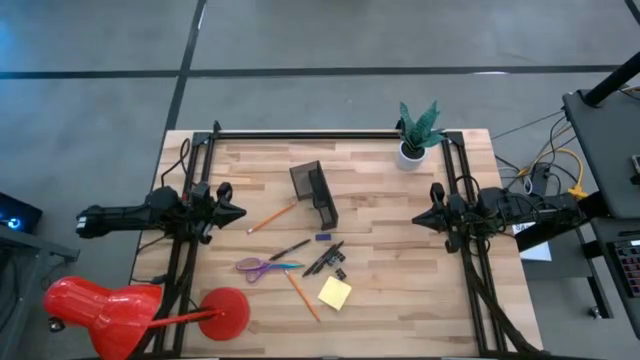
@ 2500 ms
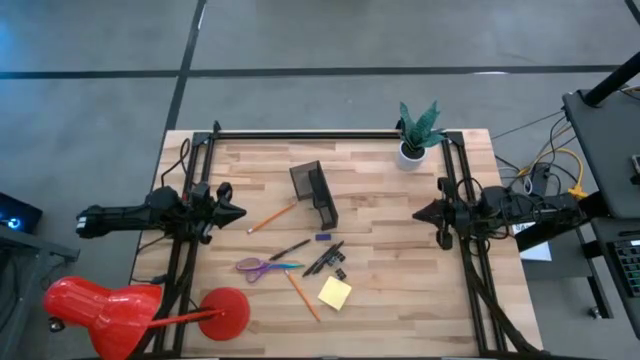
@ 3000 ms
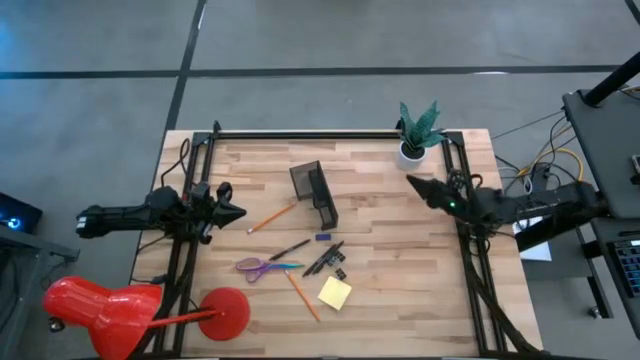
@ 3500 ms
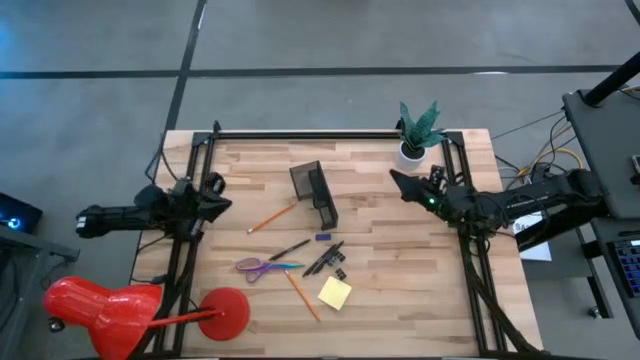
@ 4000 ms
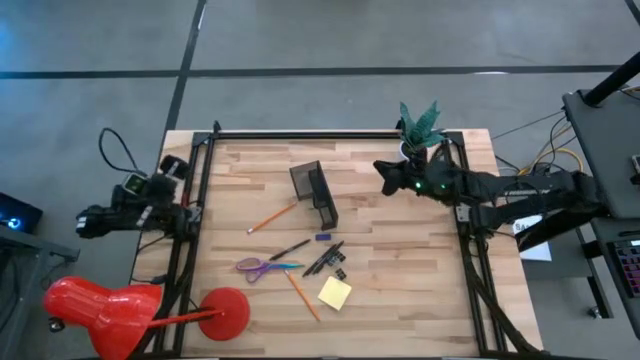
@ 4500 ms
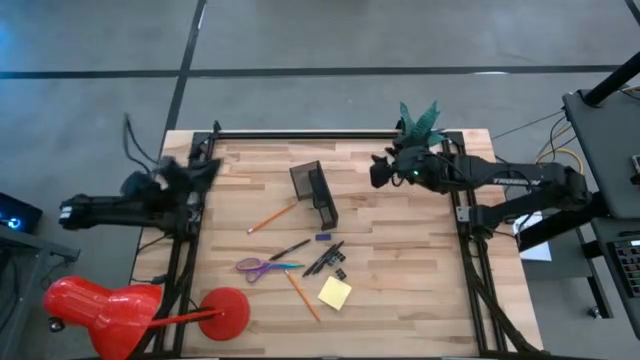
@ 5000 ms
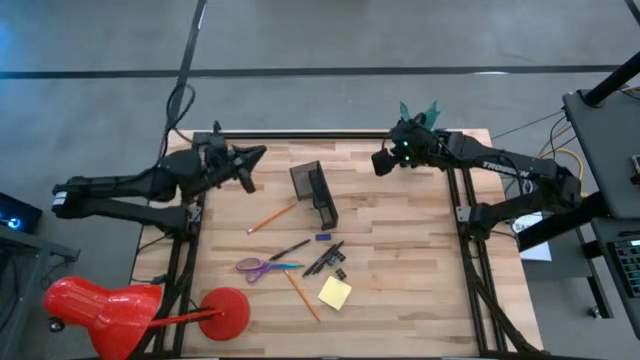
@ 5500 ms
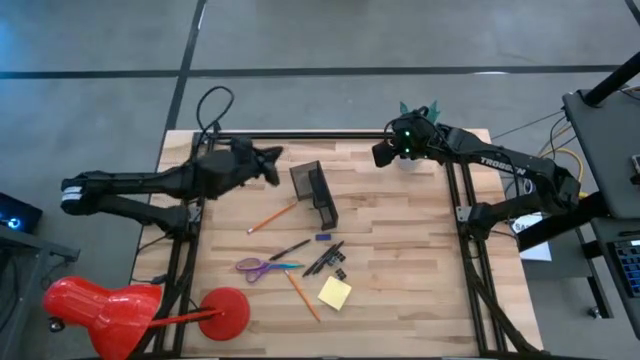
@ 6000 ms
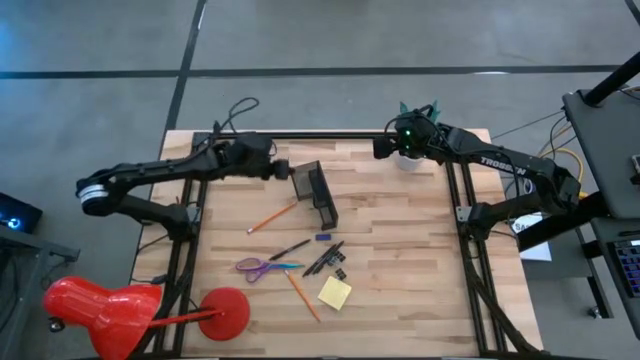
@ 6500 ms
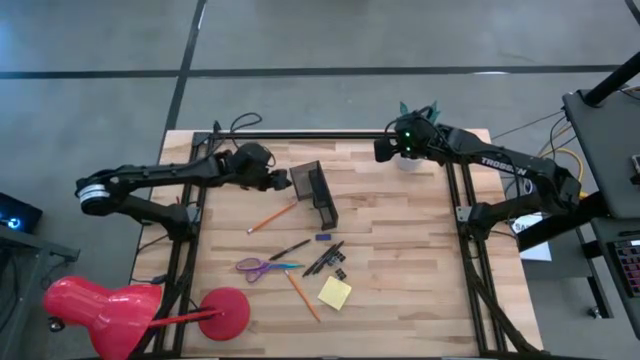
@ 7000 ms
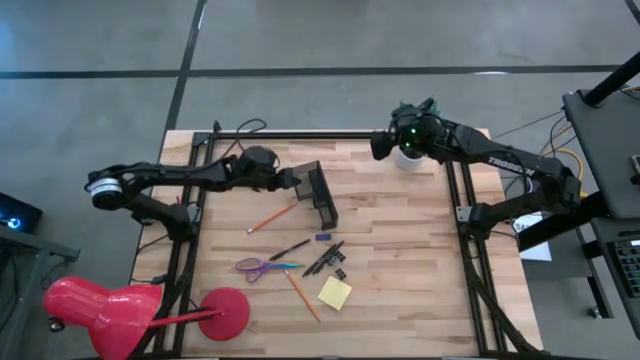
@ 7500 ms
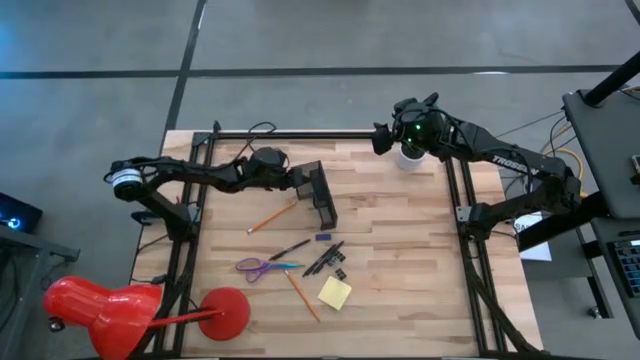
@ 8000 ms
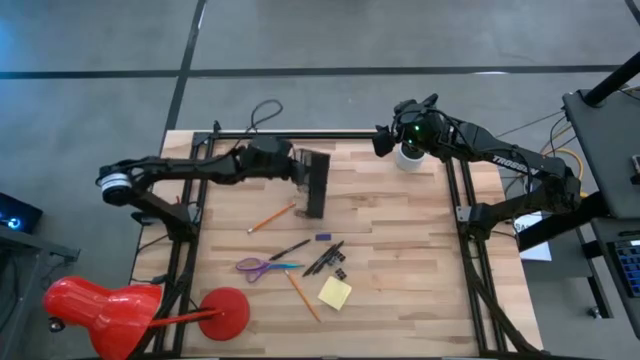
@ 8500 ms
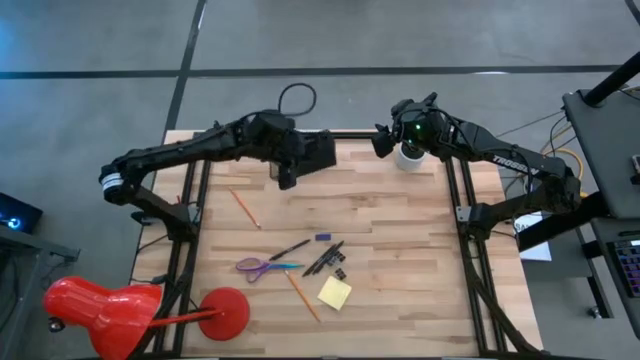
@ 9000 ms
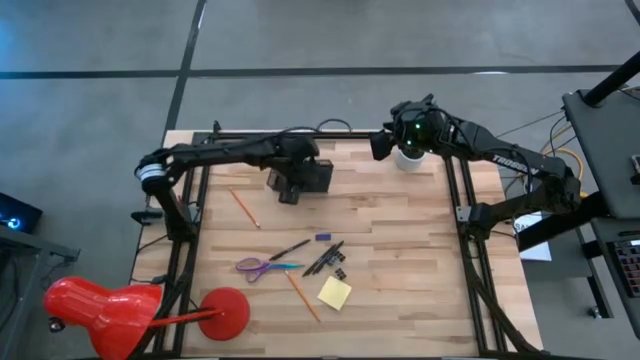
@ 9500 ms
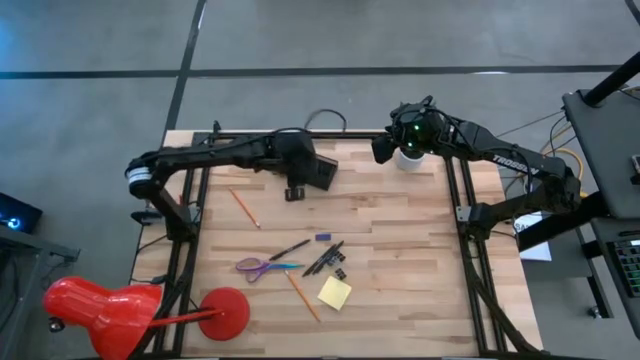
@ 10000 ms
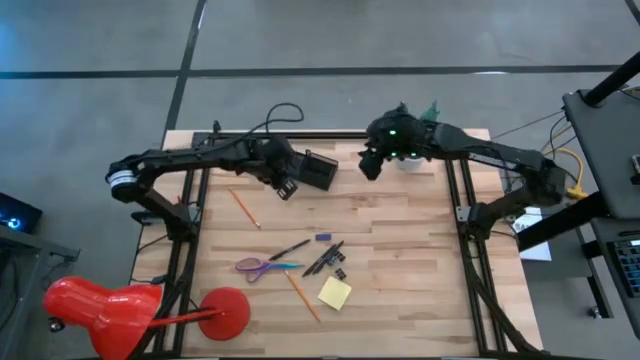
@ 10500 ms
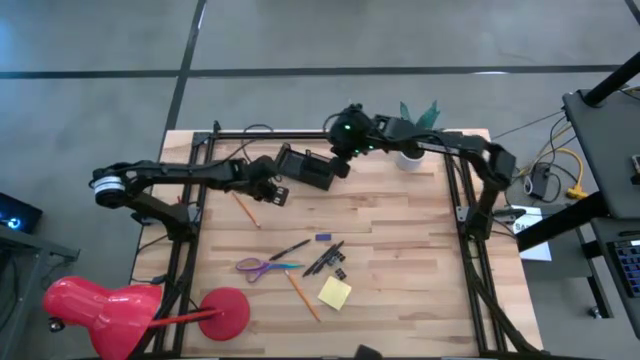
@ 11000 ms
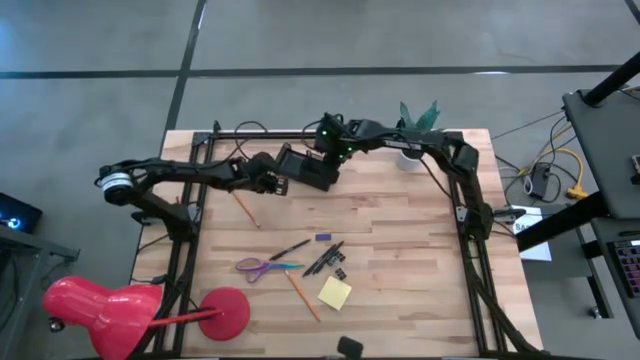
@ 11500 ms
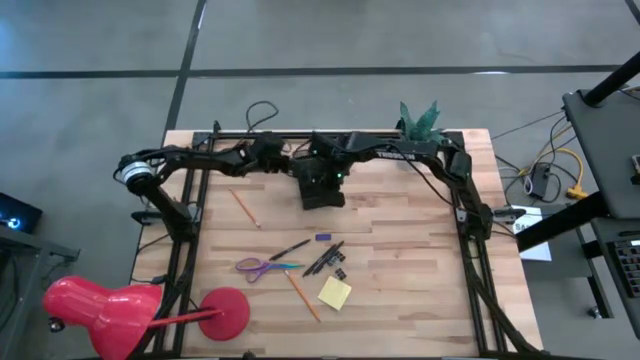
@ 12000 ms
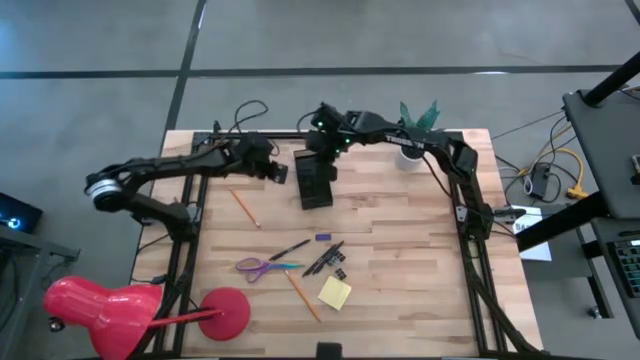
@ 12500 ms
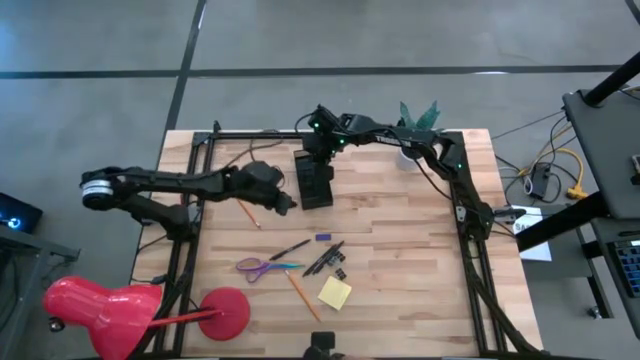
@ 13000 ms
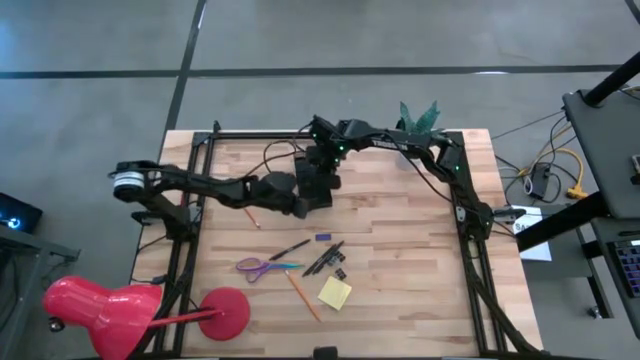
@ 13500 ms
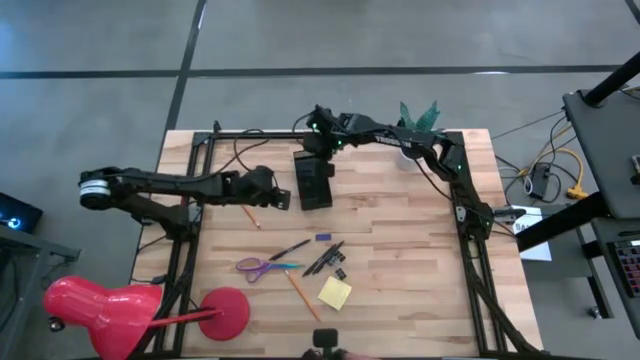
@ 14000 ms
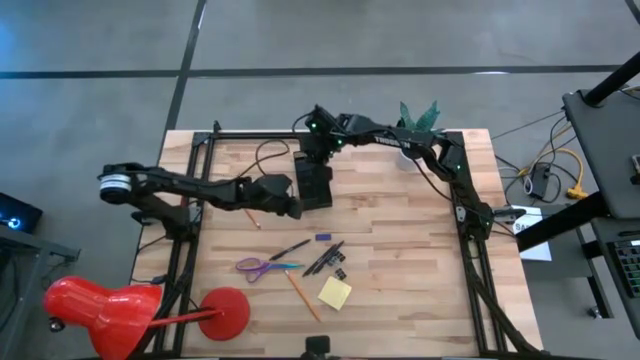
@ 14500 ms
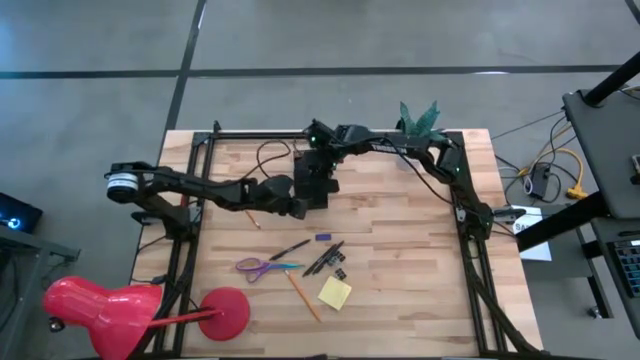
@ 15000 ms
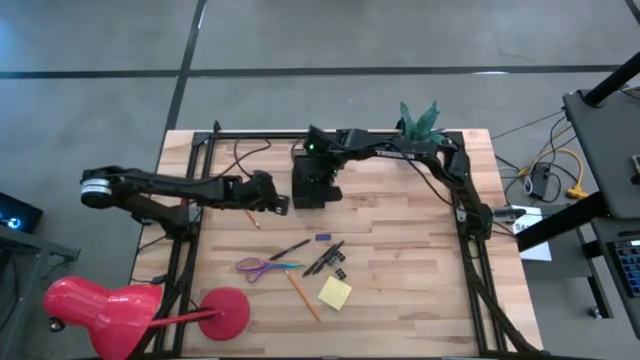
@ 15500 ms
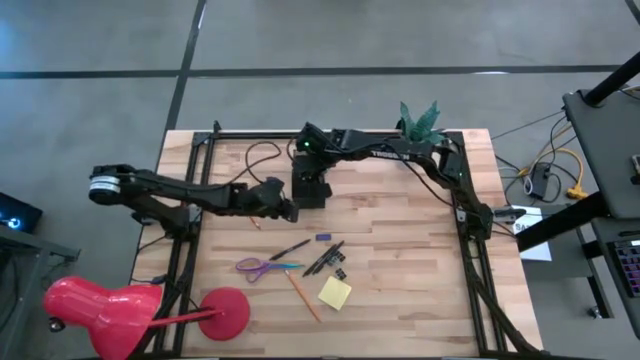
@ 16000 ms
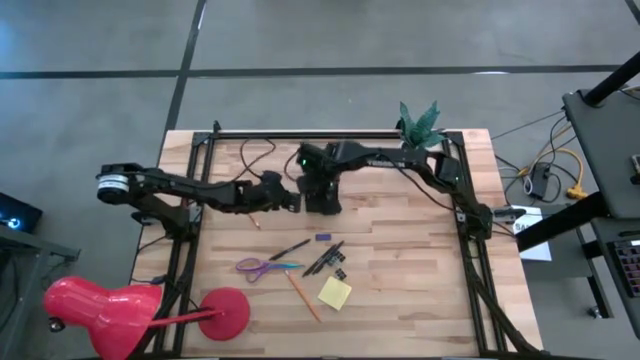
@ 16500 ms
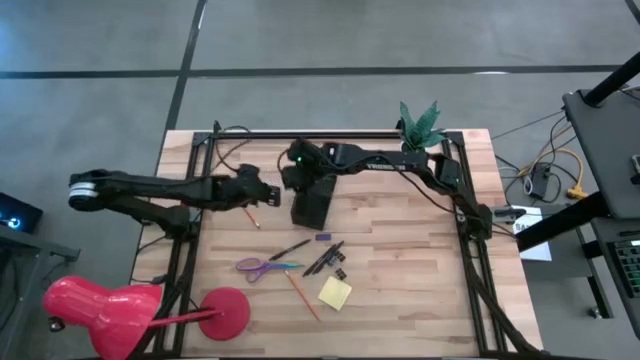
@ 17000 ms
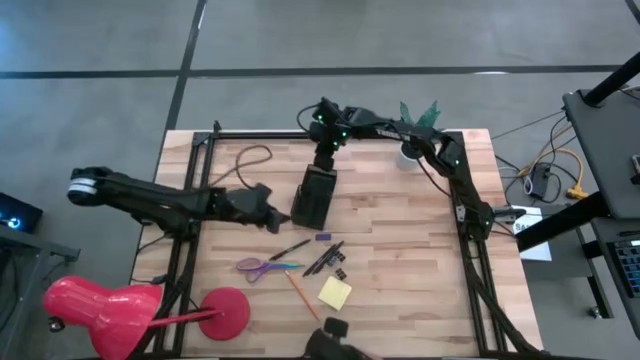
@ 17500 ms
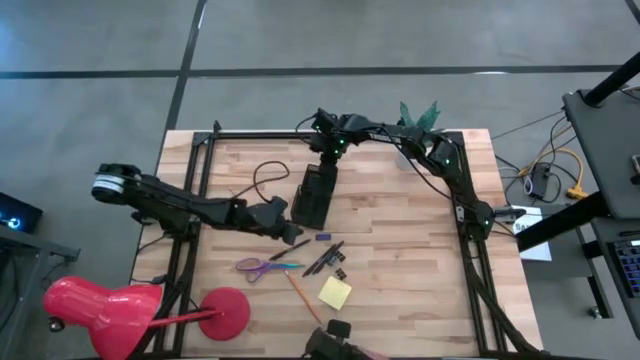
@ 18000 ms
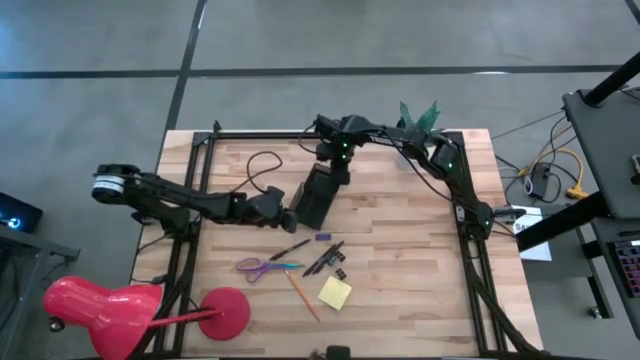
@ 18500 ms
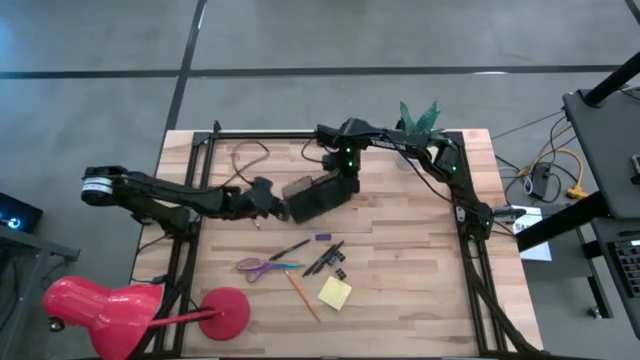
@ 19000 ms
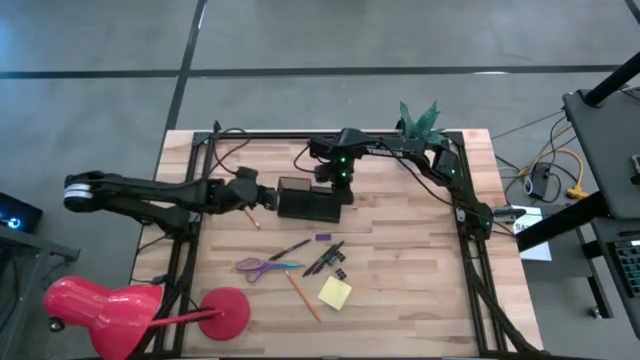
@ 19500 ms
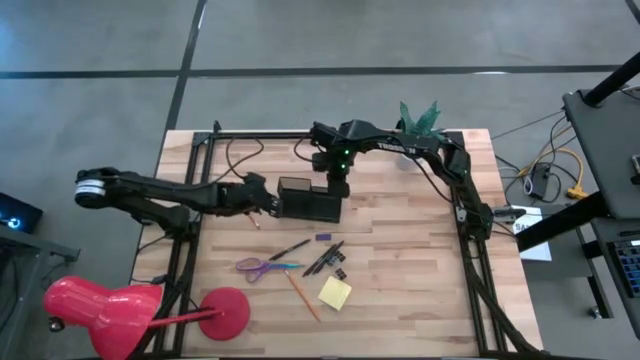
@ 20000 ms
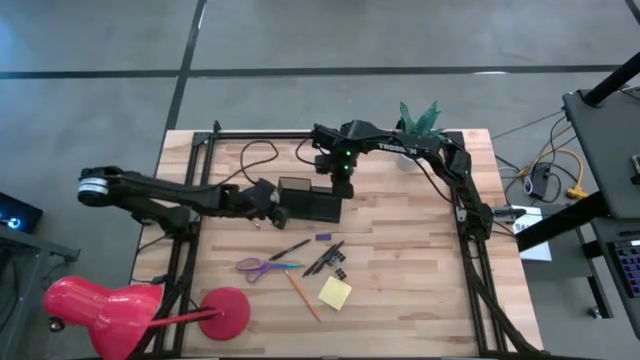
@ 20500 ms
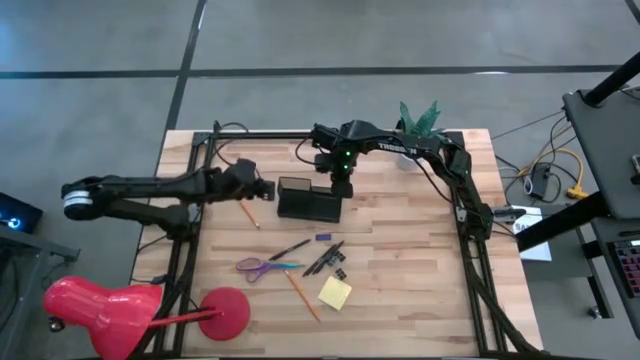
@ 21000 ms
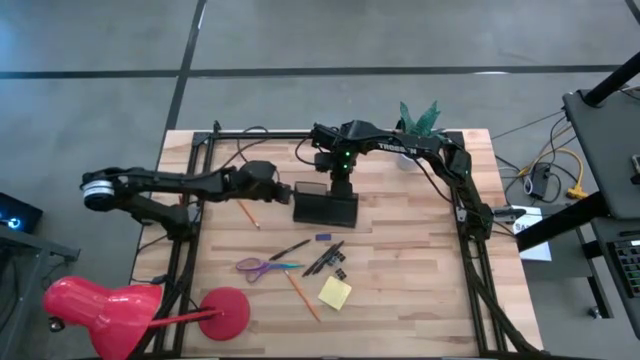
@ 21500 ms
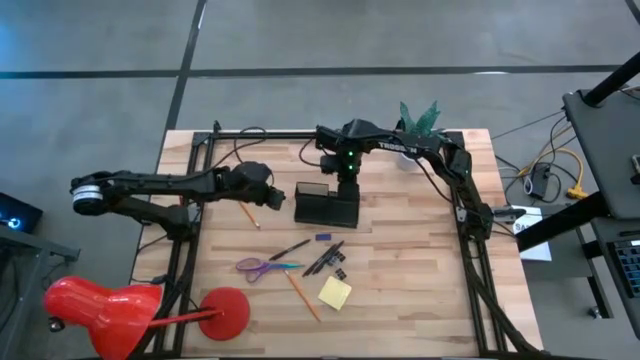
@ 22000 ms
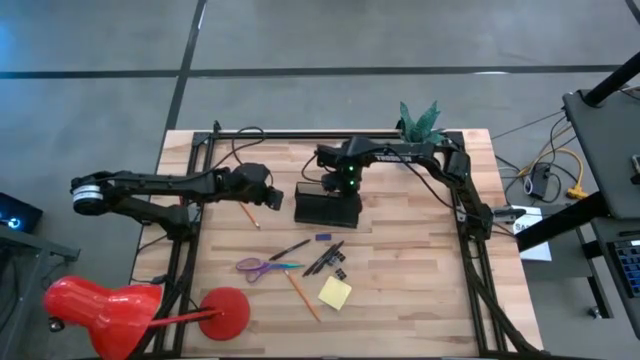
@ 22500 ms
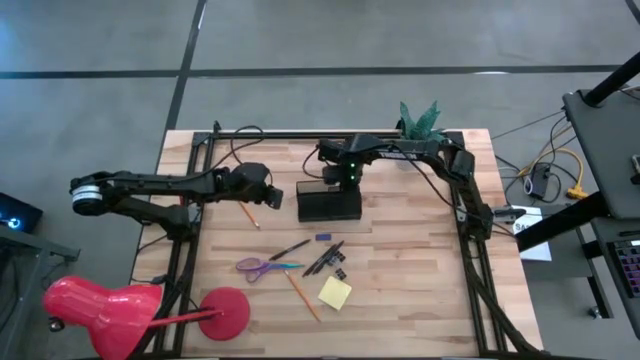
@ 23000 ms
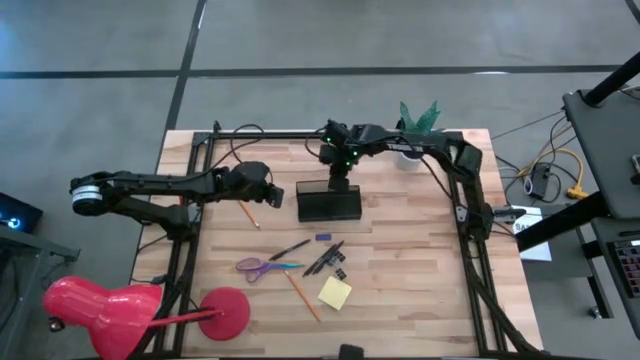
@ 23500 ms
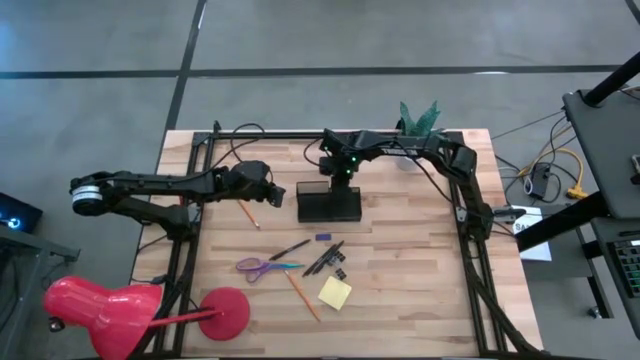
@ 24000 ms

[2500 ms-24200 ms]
Task: Pick and place office supplies into organizer
Prepare the desk organizer to put the office items
